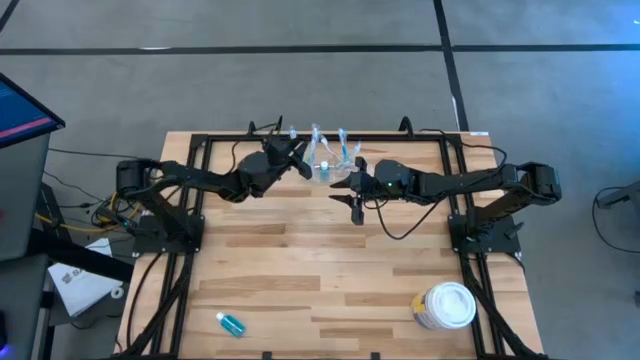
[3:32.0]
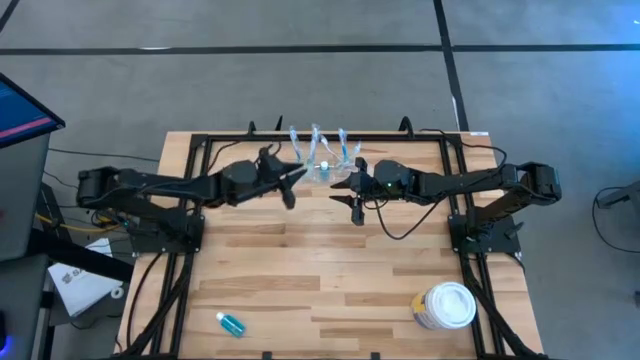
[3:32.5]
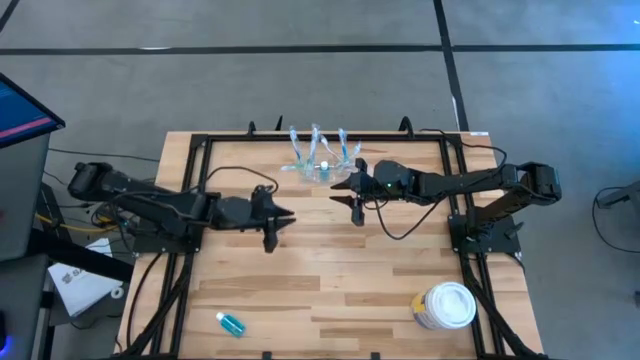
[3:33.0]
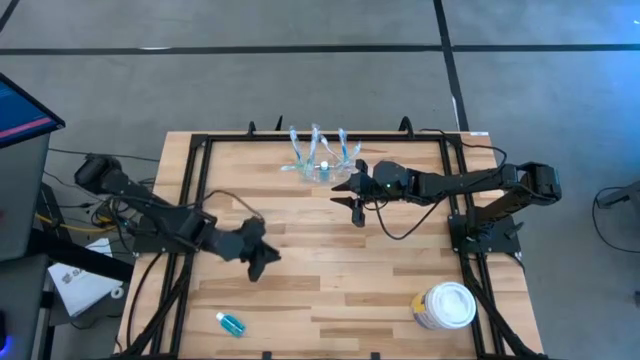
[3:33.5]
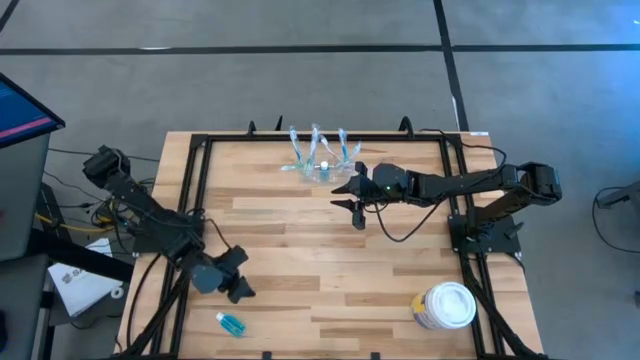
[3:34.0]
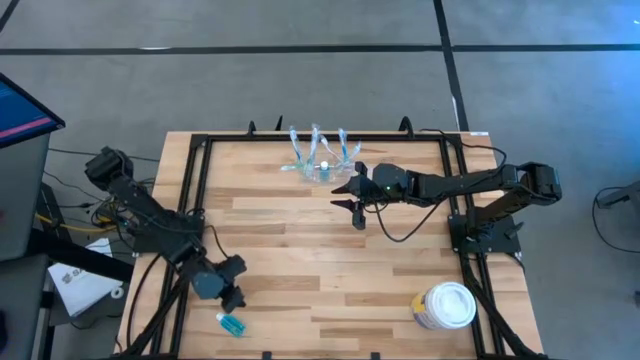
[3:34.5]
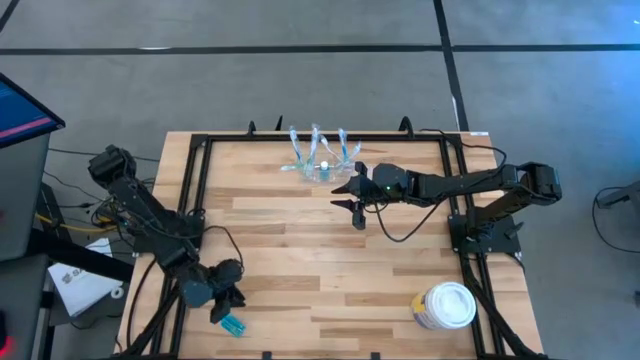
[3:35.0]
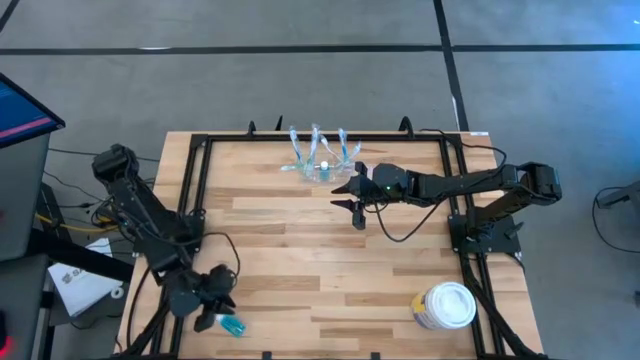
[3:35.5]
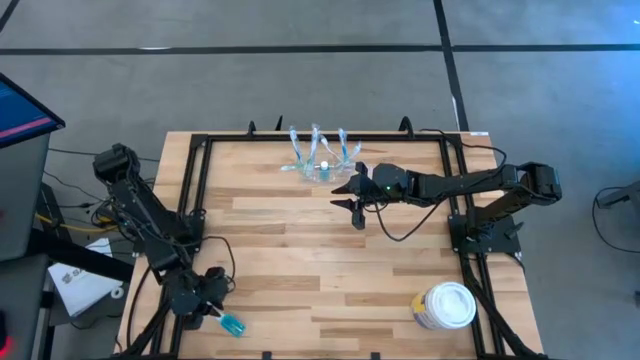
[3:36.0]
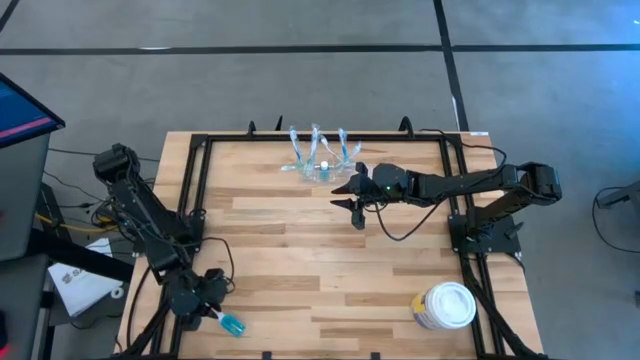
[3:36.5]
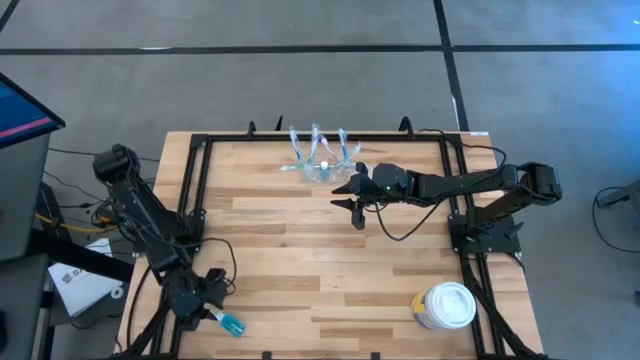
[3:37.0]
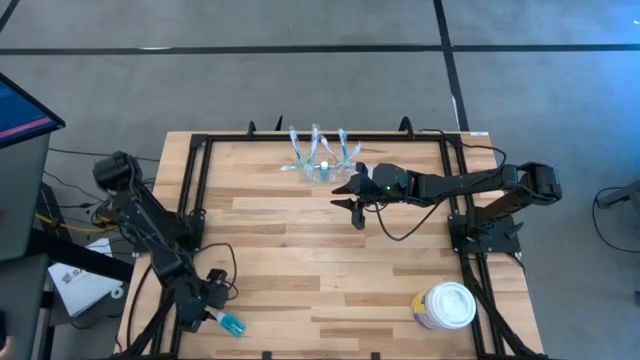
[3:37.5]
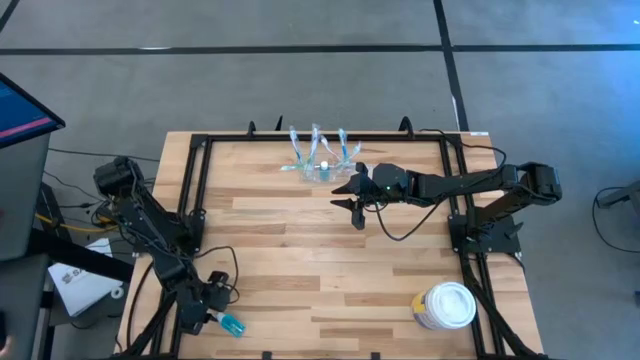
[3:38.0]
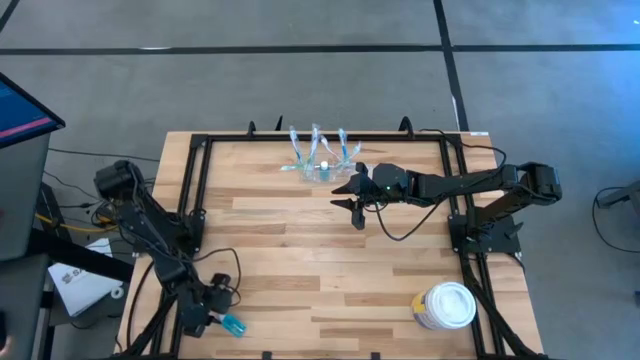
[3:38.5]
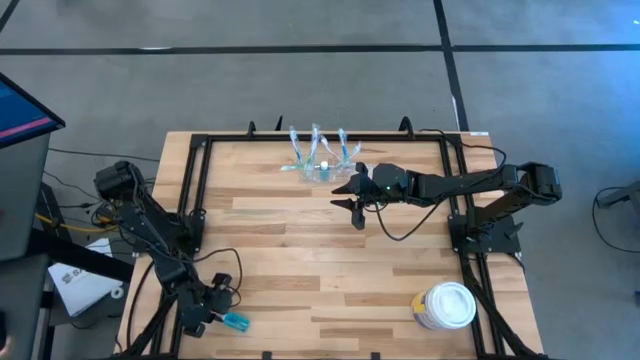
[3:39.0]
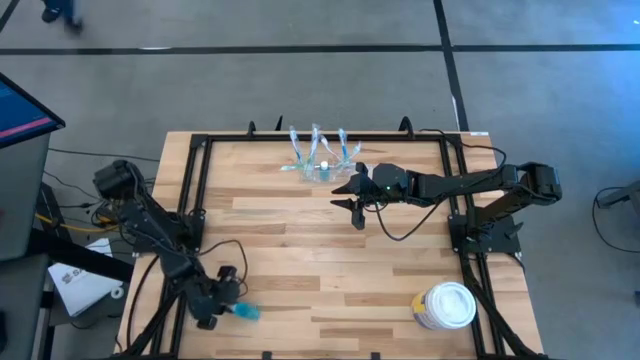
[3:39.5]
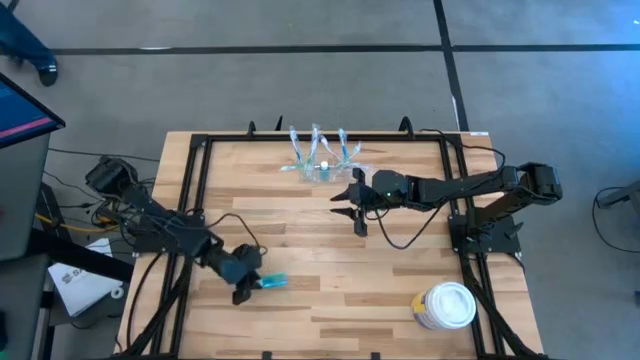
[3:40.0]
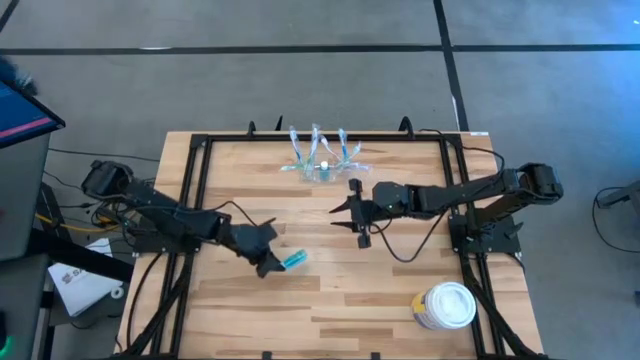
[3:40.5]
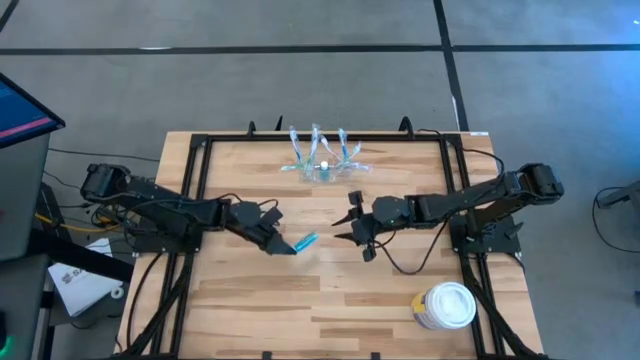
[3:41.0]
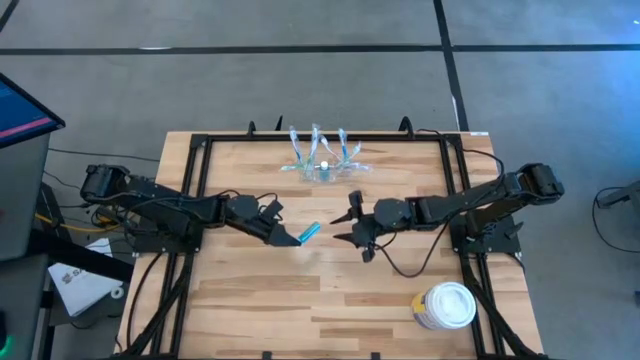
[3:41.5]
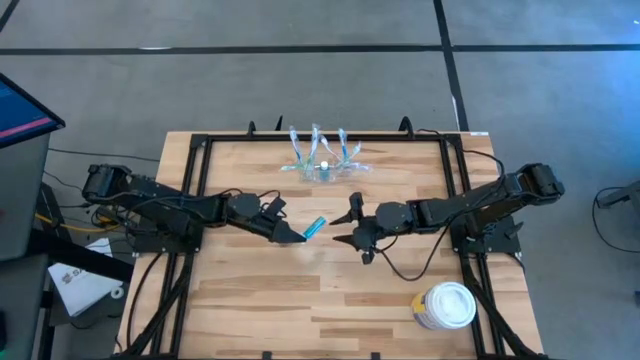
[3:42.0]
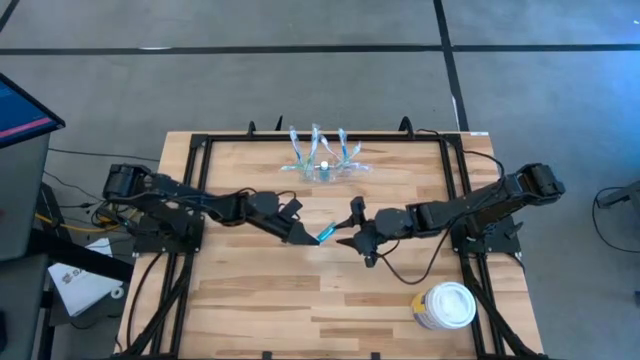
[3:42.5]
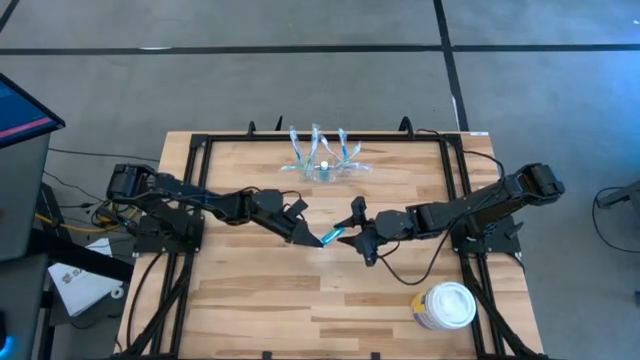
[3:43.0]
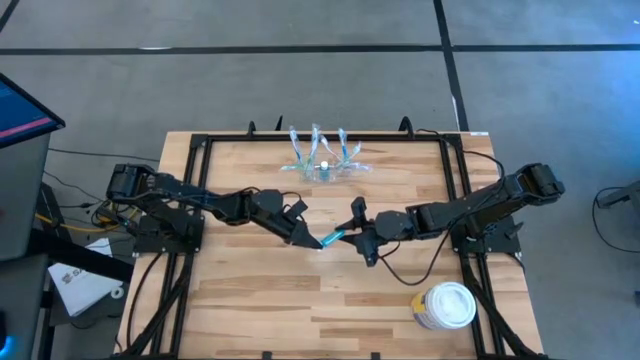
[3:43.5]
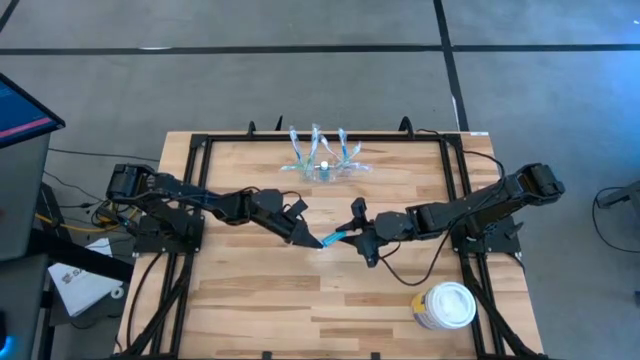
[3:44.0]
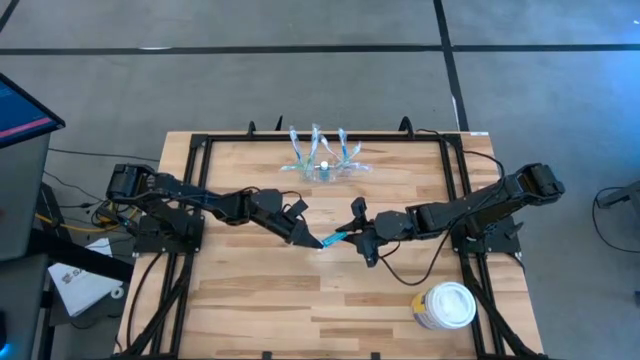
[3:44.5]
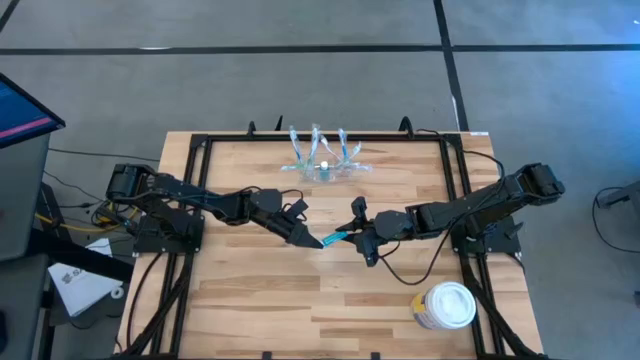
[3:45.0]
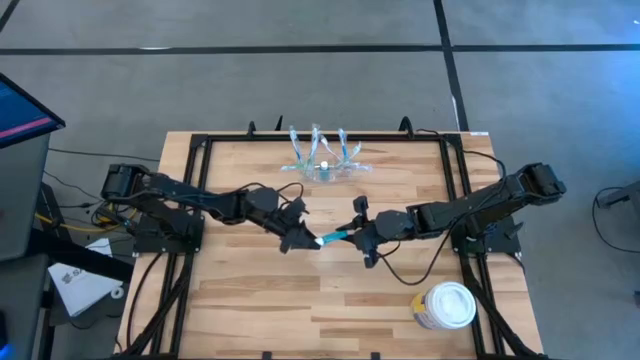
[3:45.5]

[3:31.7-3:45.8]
Task: Pick & Place toothbrushing station
Put the blue mouthwash into the transparent organizer

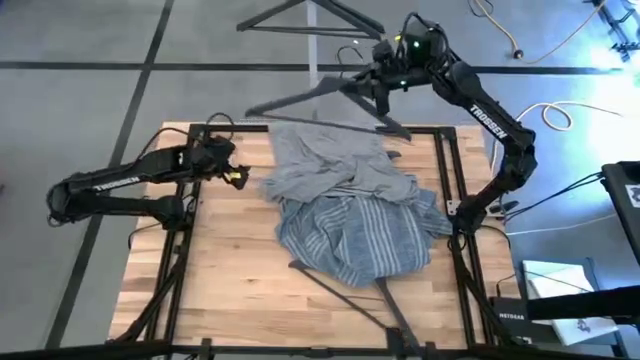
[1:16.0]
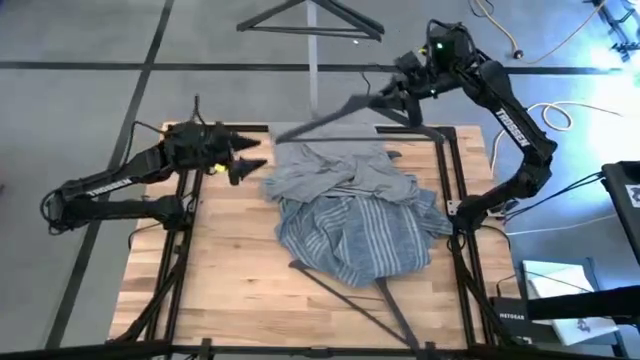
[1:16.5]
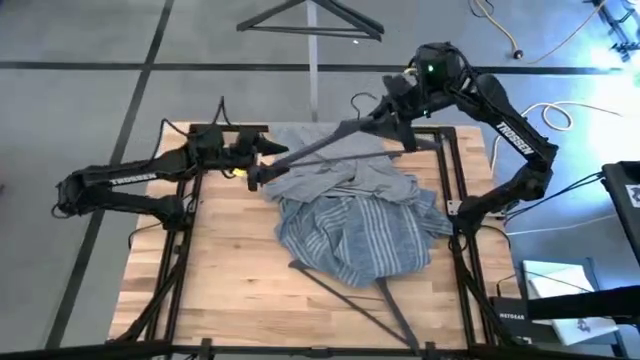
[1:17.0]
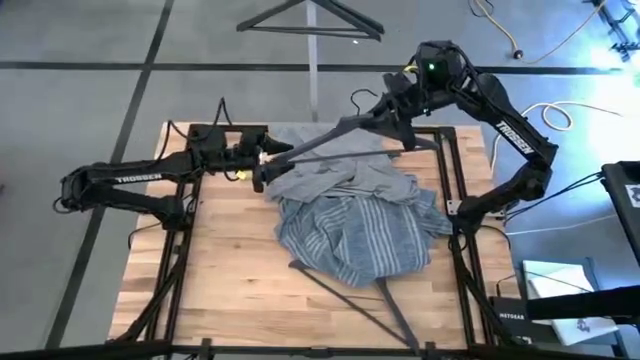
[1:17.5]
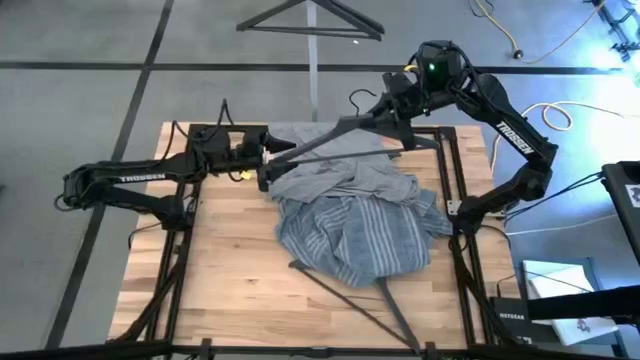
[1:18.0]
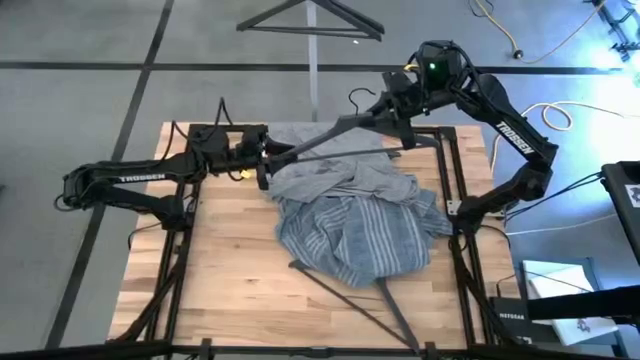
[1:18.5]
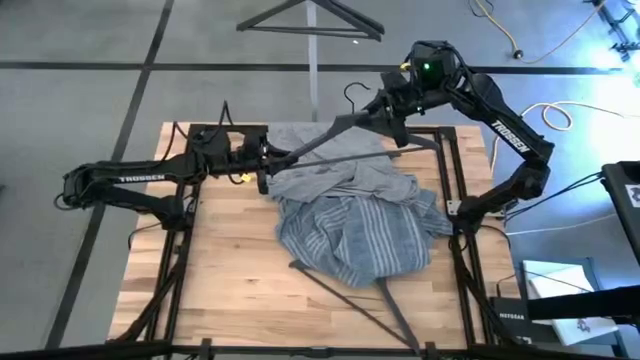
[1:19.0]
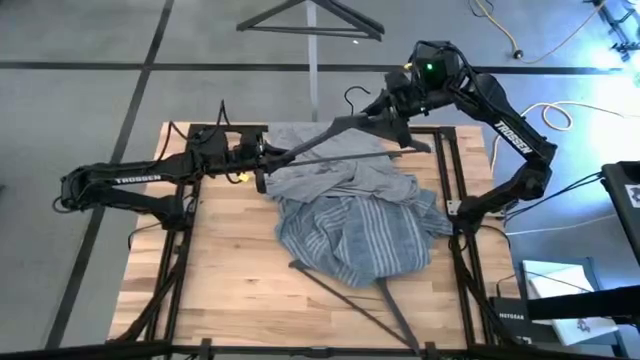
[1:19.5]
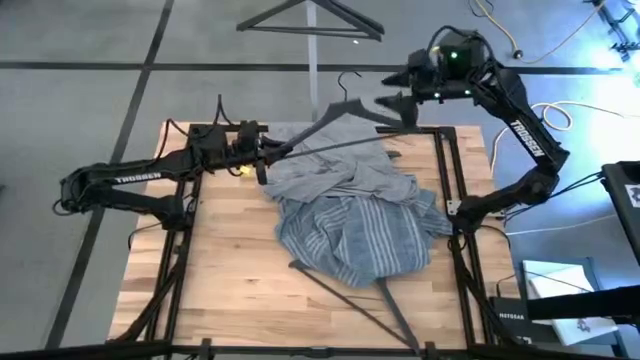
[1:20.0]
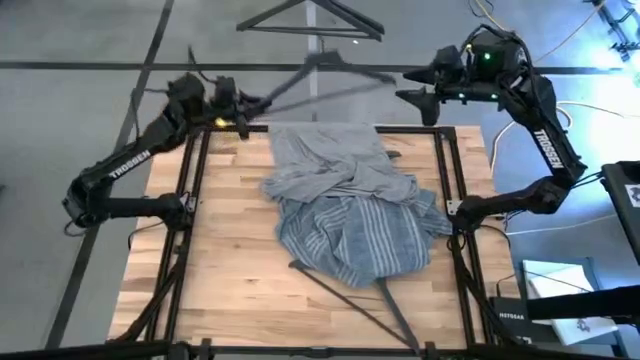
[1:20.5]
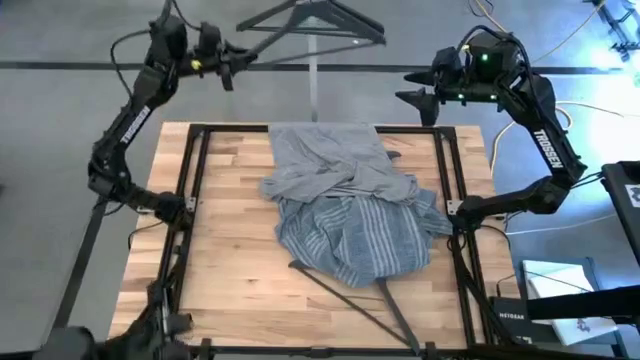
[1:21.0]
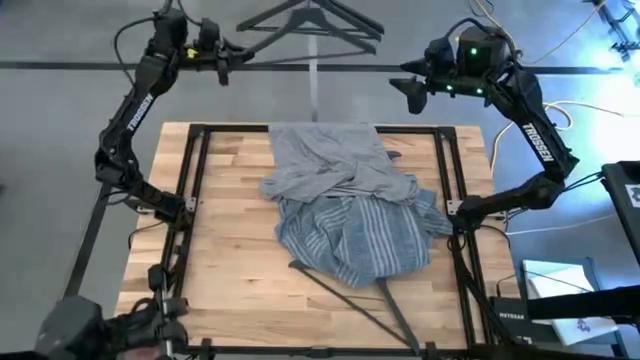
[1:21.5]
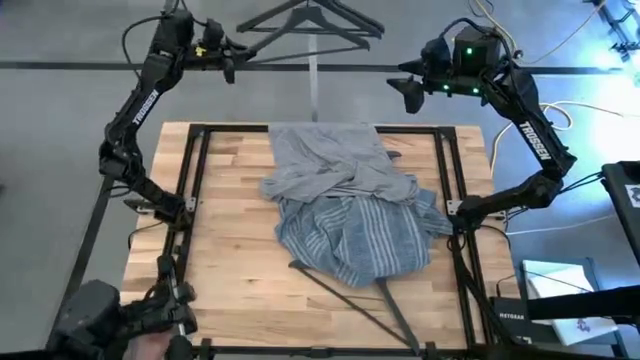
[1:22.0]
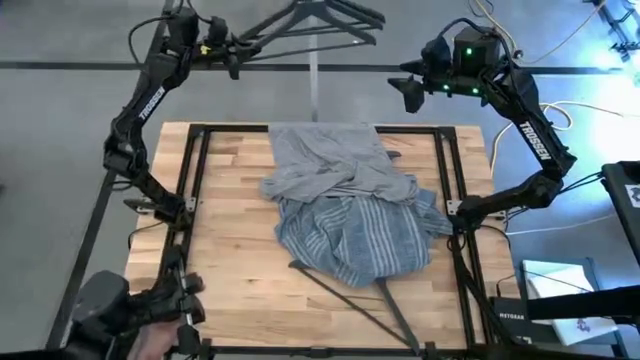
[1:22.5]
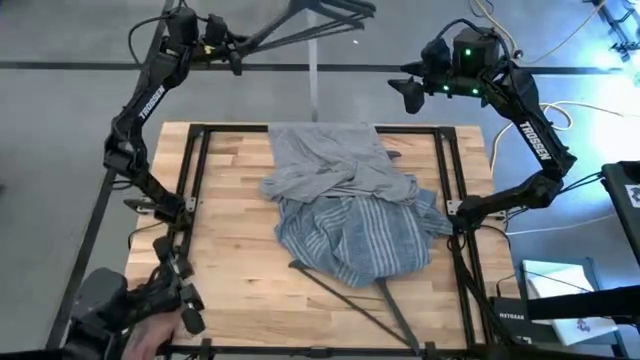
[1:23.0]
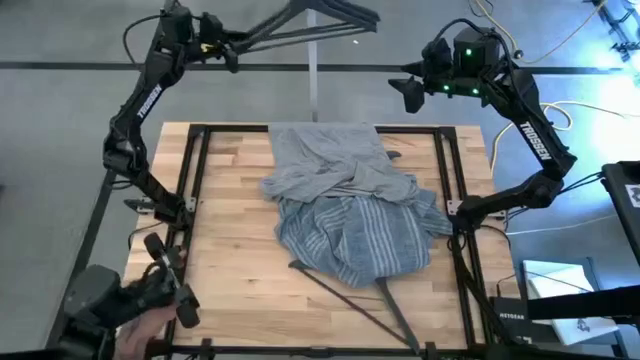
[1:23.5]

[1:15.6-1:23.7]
Task: Unhang clothes
Hang the hanger
